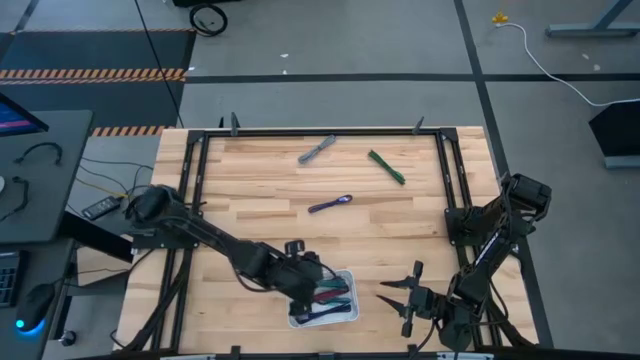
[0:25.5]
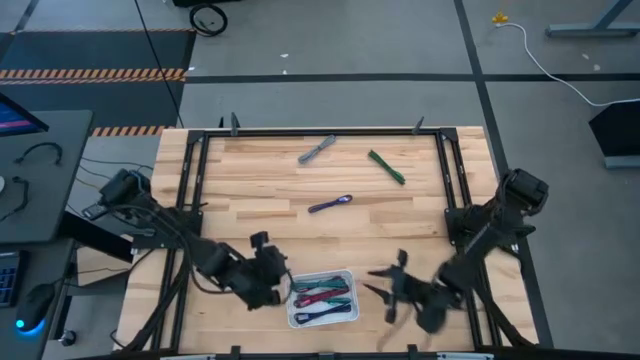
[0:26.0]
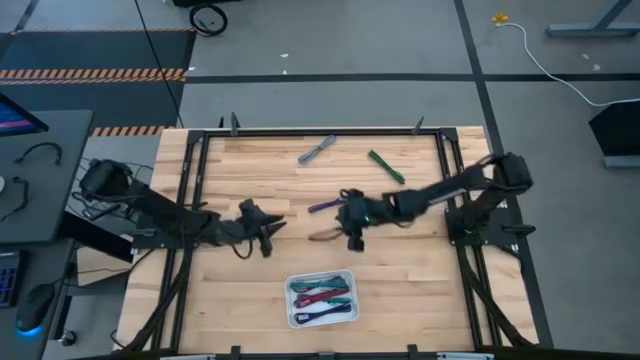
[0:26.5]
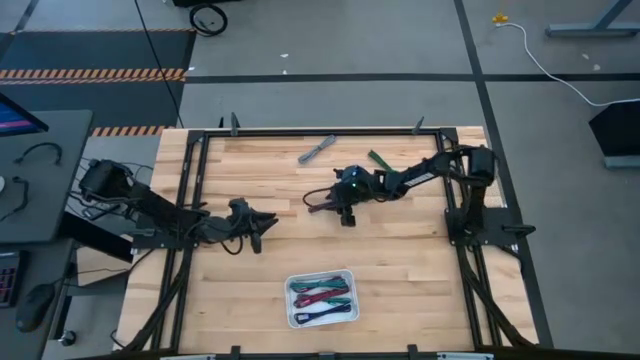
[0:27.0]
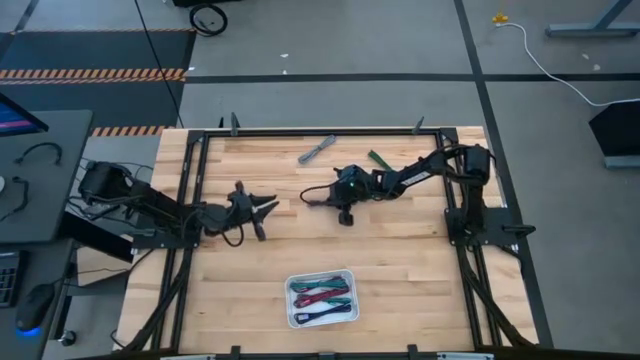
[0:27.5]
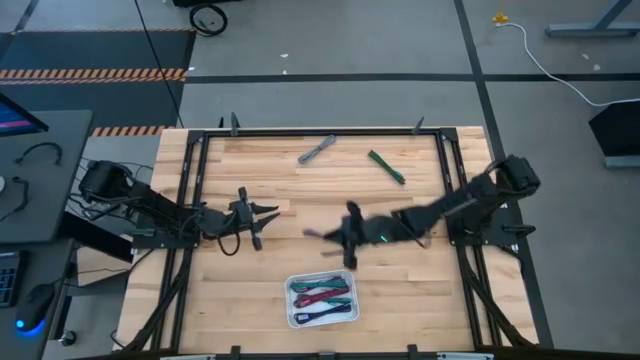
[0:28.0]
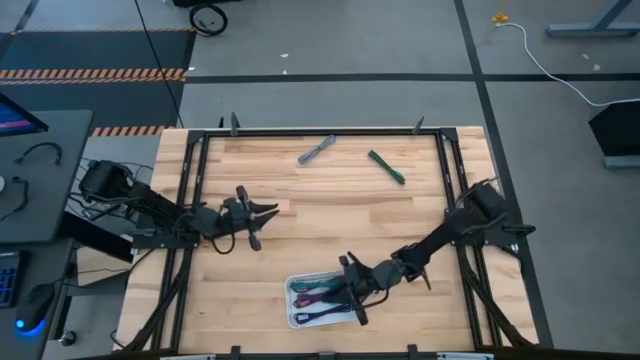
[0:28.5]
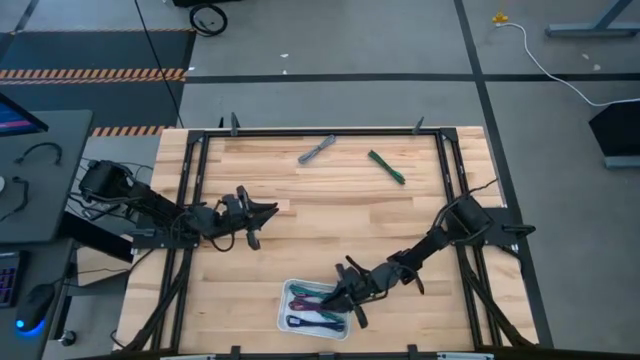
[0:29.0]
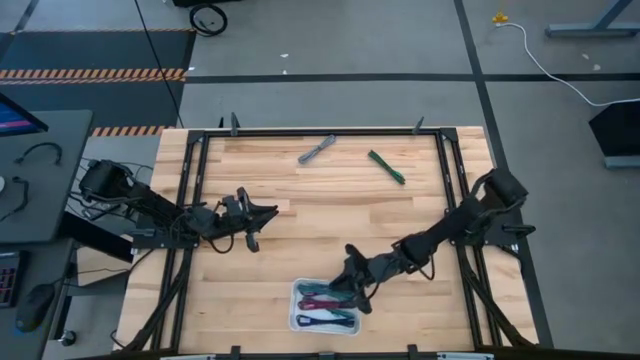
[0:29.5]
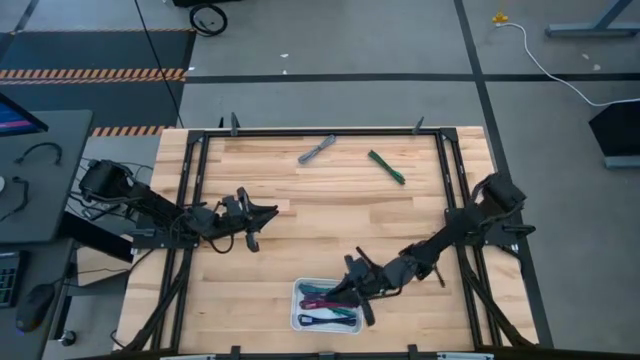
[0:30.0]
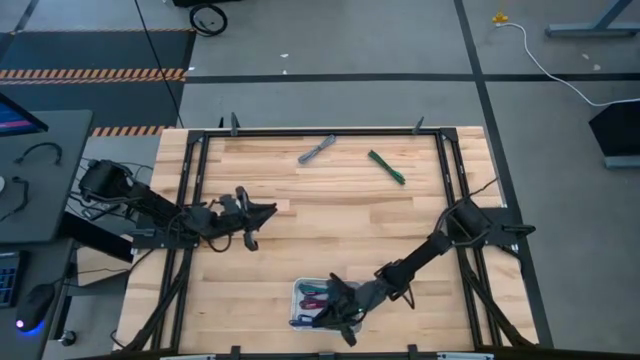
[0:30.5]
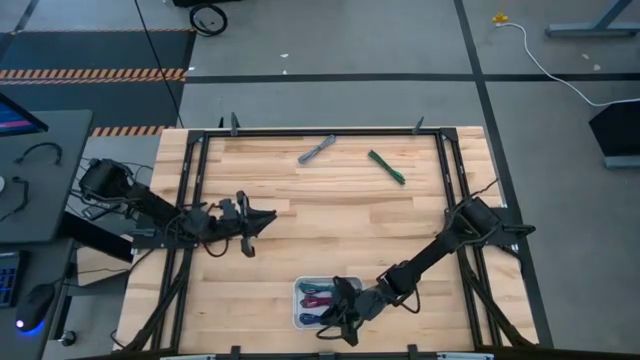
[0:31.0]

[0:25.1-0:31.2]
Task: Pick and place USB-C Cables
Put the purple USB cable into the white bin

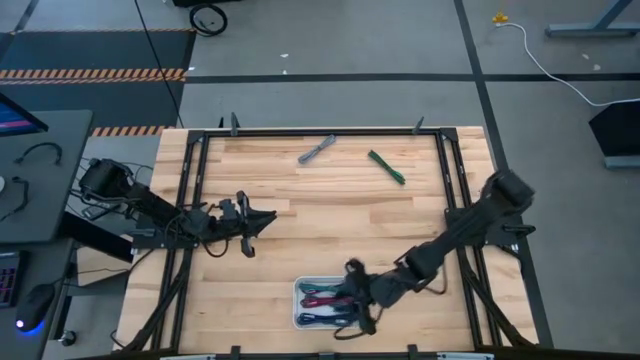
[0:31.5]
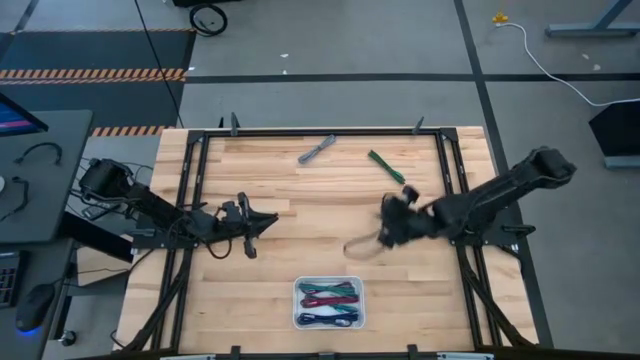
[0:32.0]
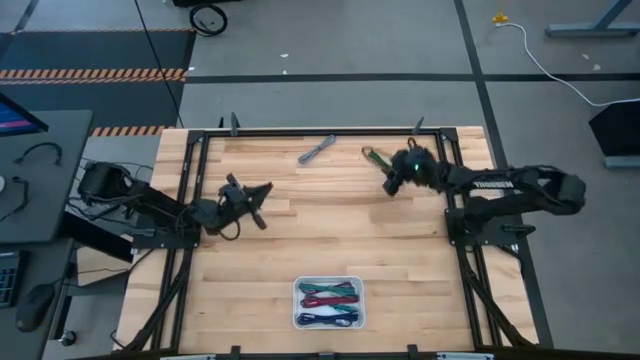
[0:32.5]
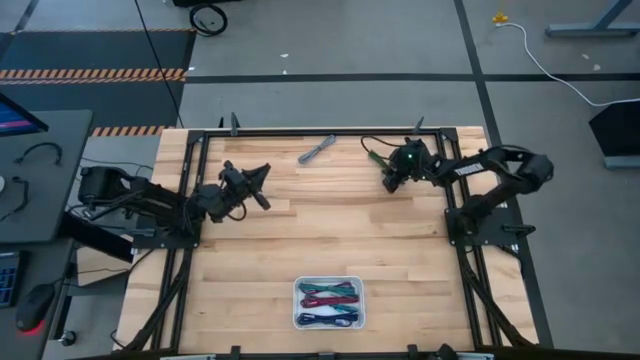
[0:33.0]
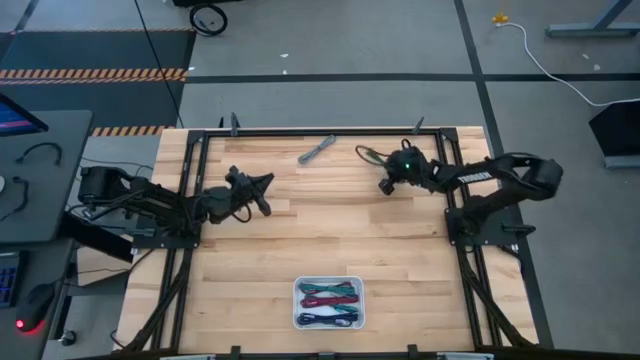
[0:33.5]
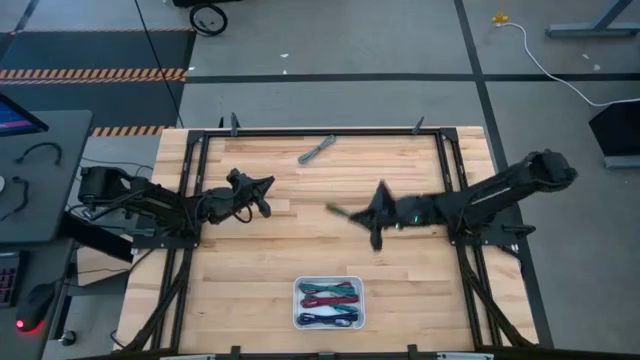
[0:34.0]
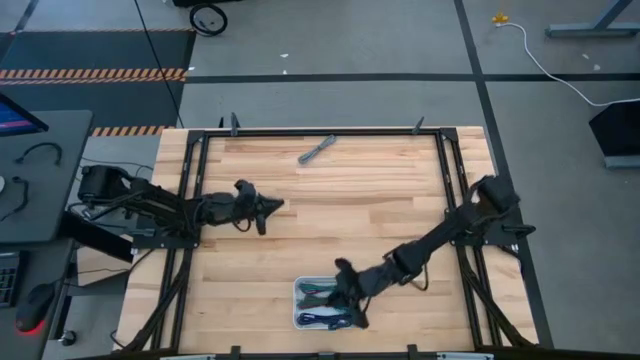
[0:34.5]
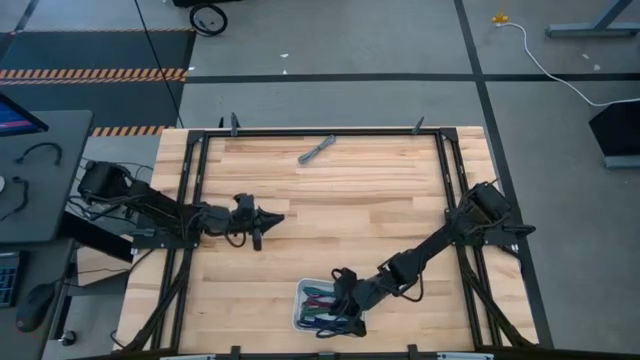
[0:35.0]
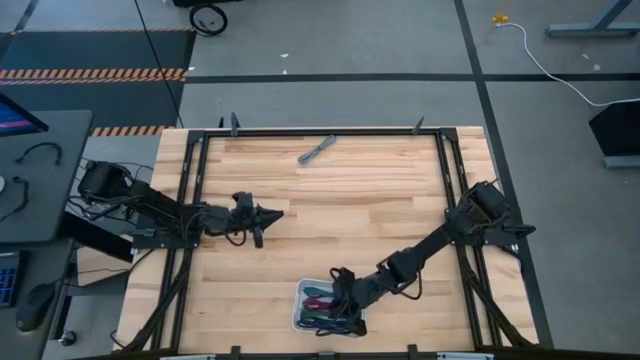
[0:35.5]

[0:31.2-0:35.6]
Put the green USB cable into the white bin

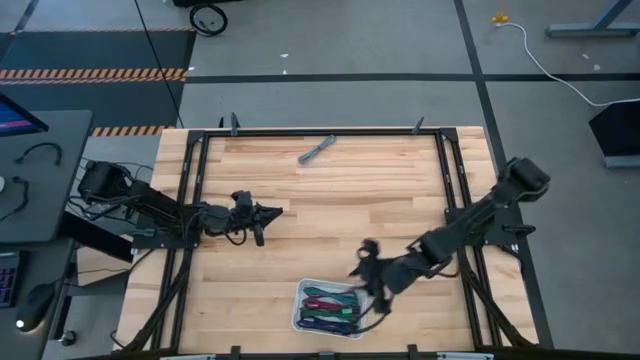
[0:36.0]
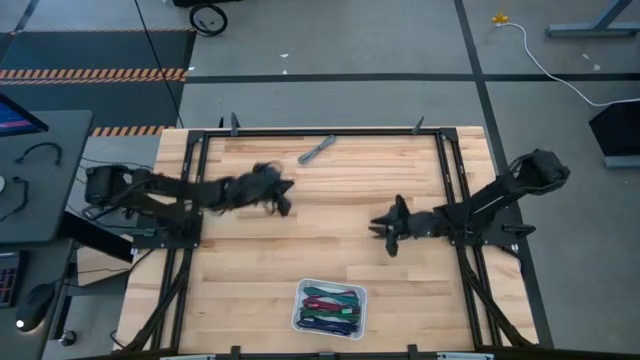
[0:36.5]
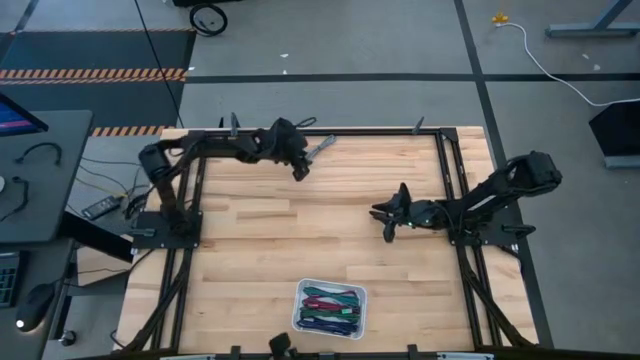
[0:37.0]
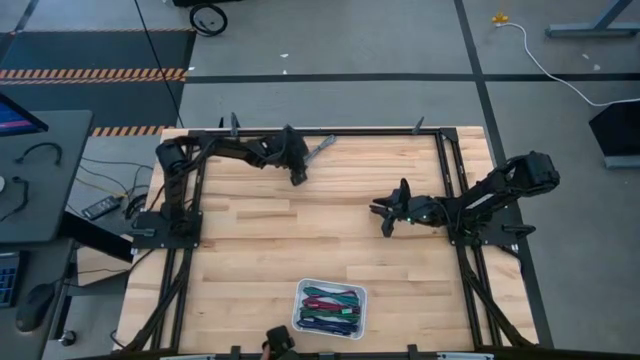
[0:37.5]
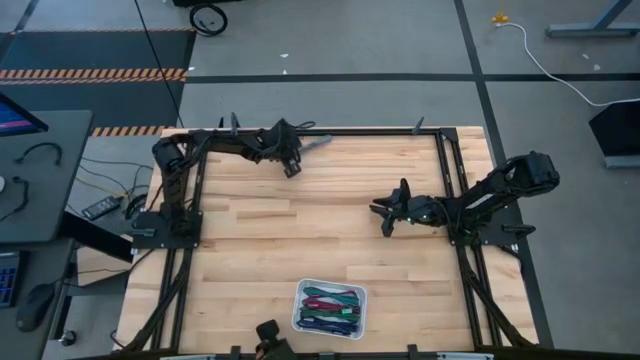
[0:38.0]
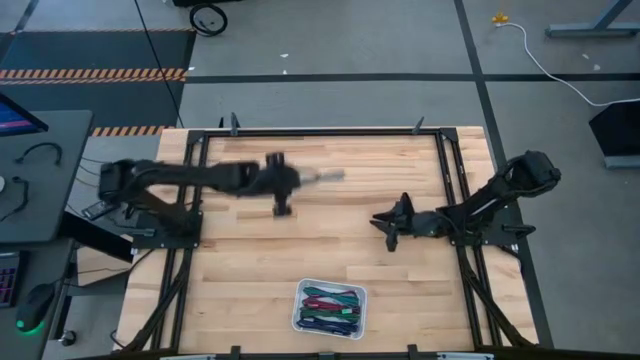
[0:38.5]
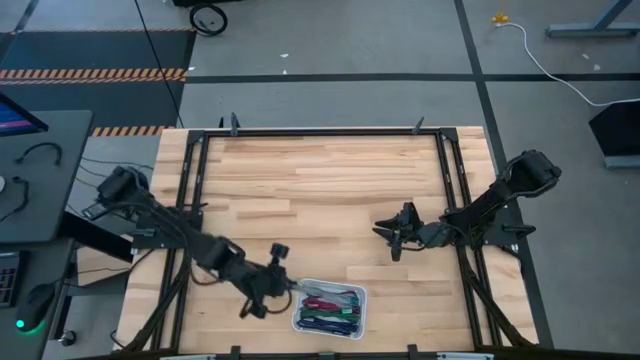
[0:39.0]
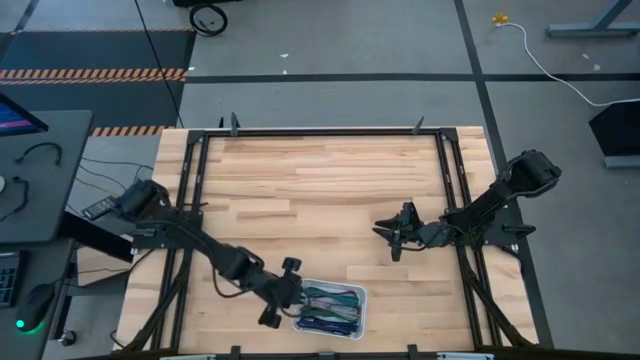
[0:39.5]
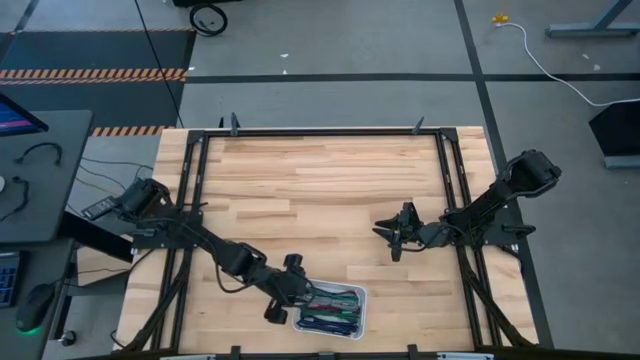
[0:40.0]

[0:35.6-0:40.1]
Put the white USB cable into the white bin

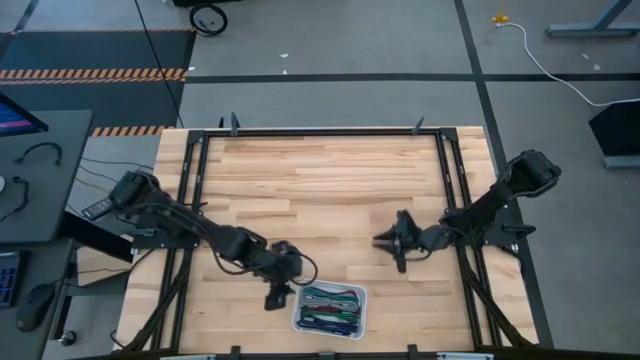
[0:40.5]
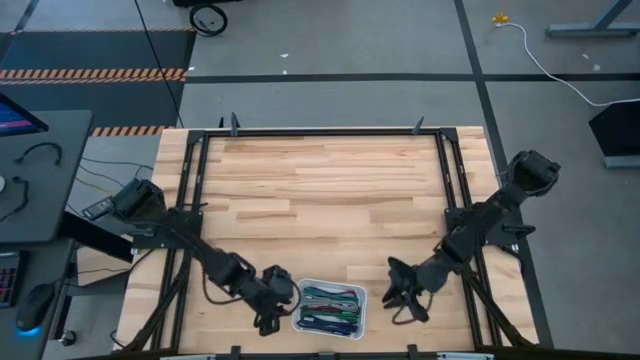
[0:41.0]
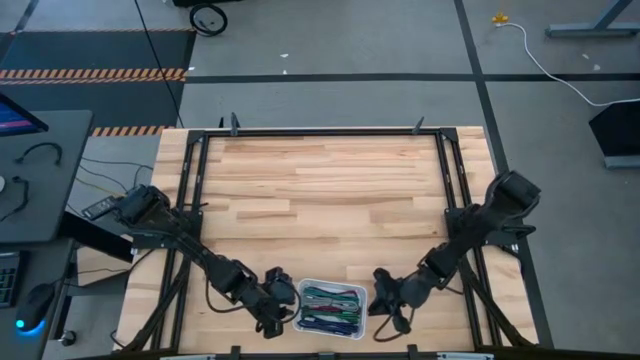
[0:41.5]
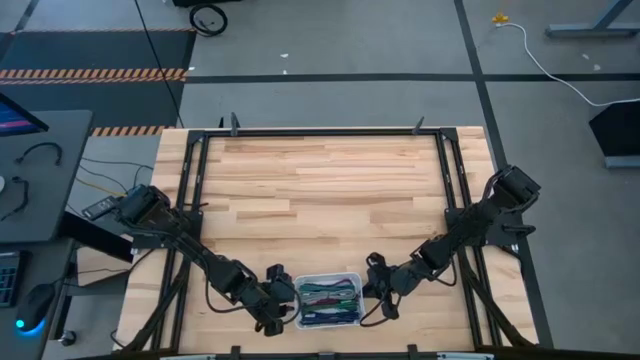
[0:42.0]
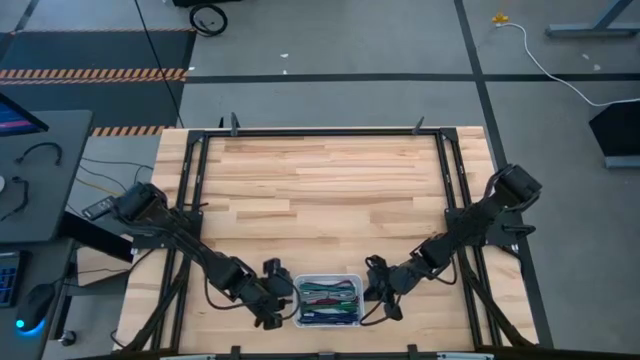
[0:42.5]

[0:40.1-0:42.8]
Adjust the white bin

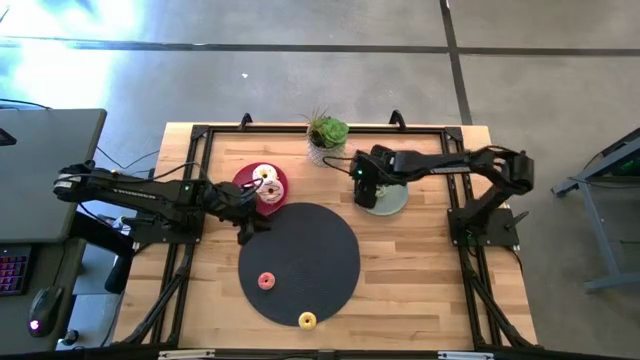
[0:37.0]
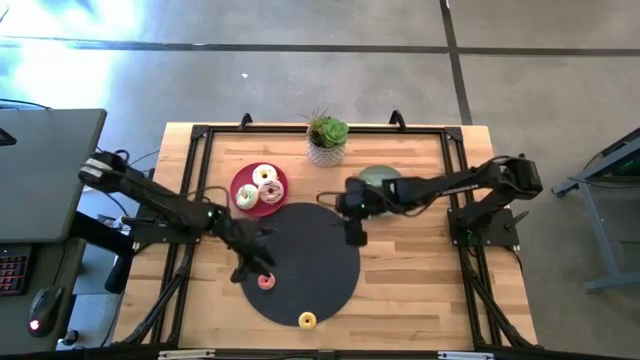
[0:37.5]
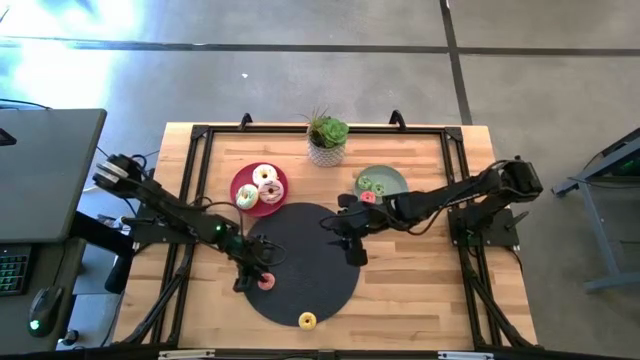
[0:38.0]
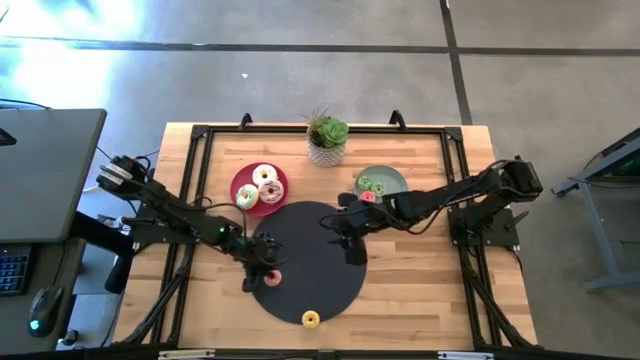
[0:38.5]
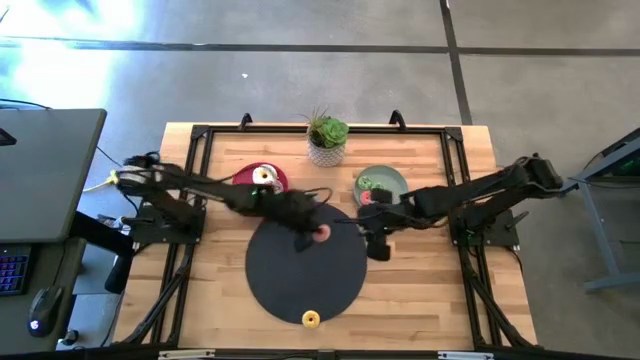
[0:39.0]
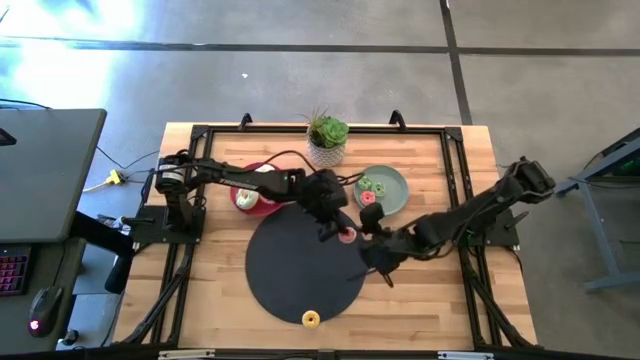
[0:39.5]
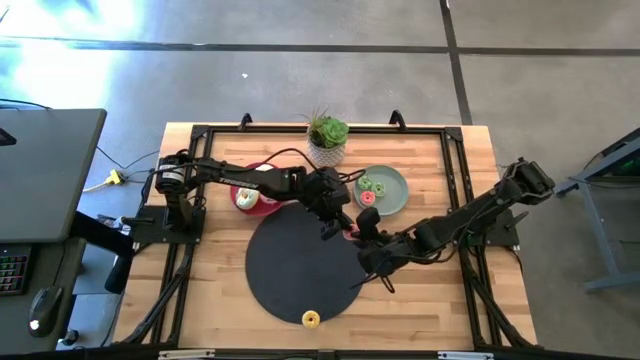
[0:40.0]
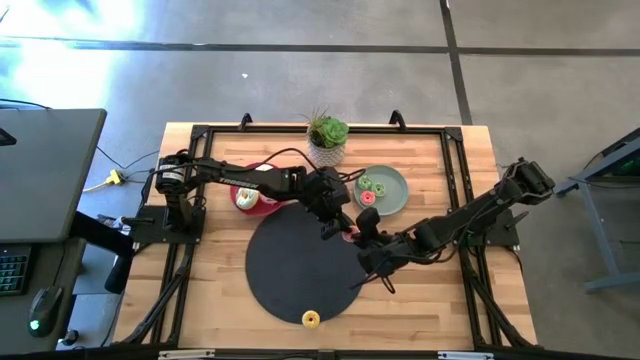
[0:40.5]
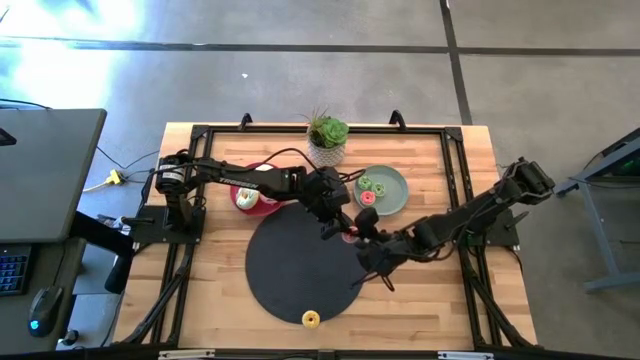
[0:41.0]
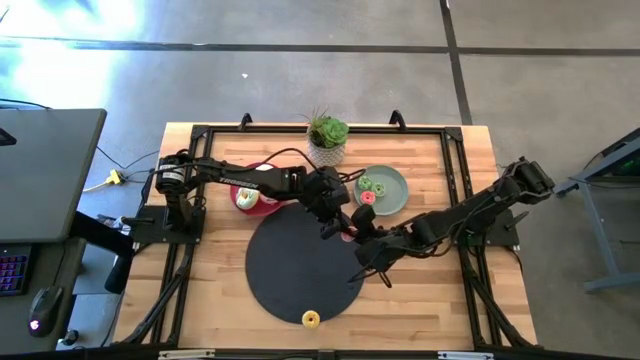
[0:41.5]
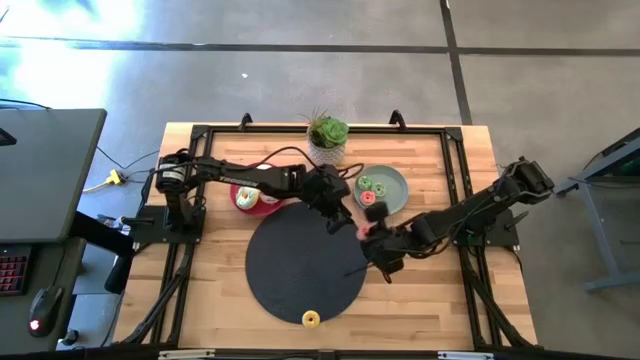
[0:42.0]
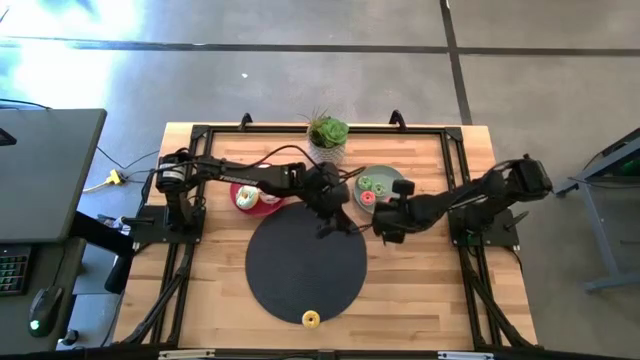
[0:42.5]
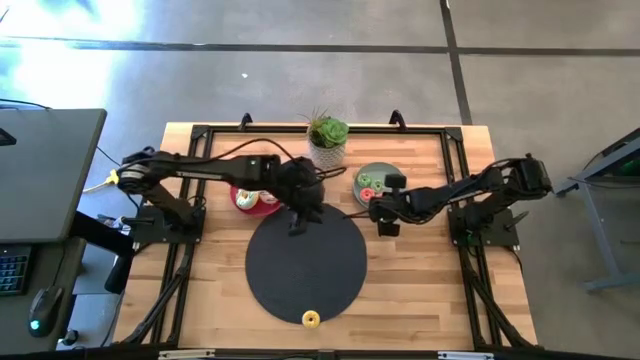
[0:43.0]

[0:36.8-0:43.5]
Task: Pick & Place donuts
Put the small red donut on the gray plate
